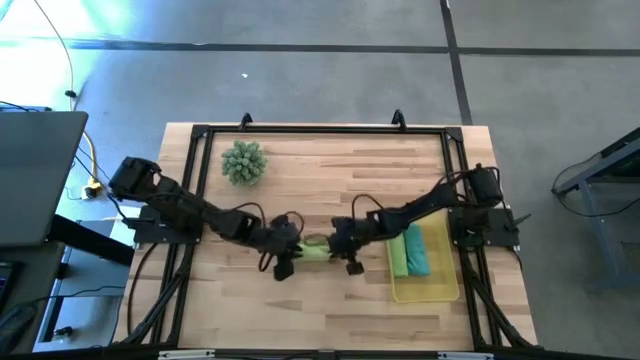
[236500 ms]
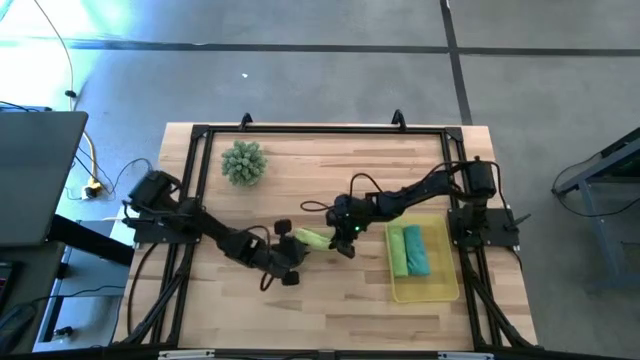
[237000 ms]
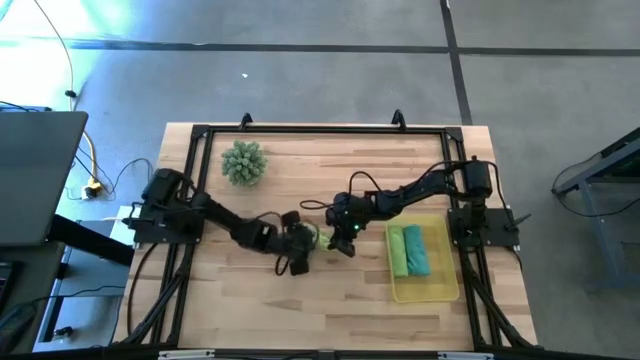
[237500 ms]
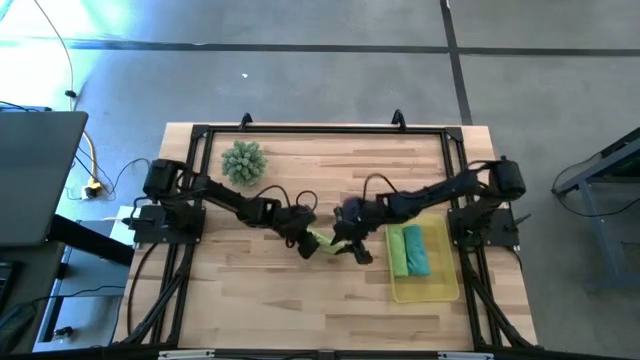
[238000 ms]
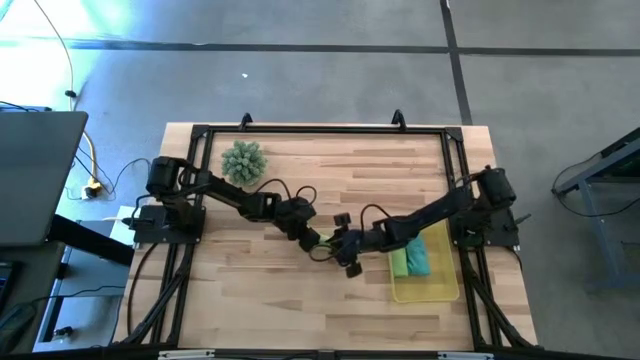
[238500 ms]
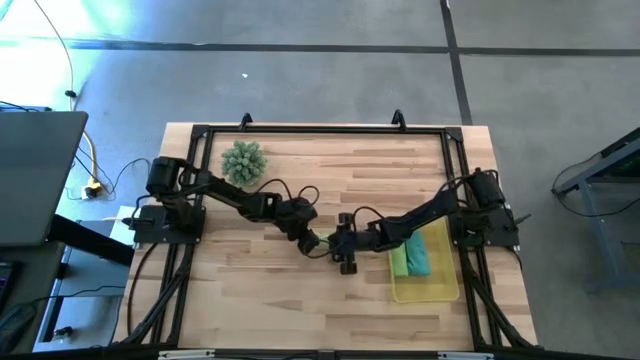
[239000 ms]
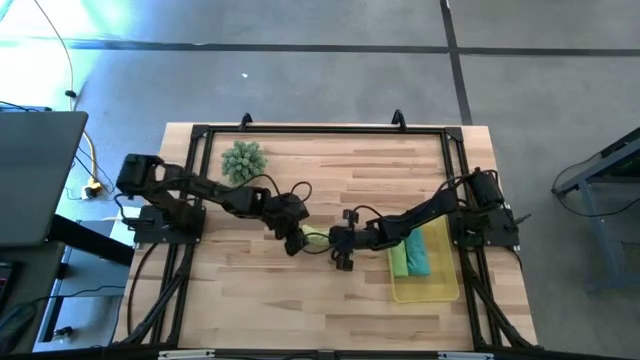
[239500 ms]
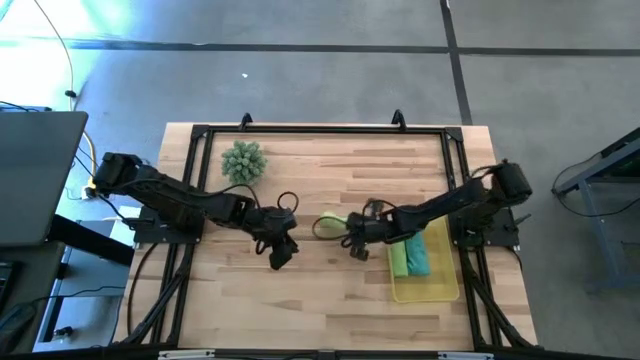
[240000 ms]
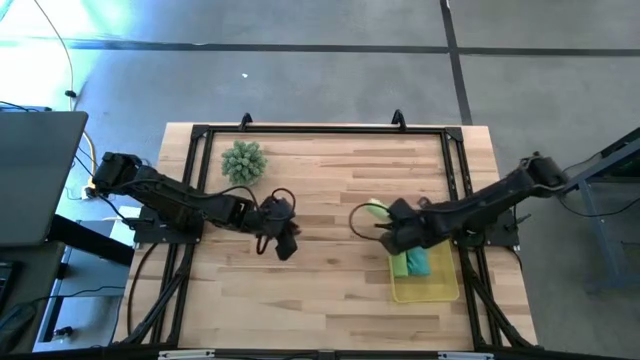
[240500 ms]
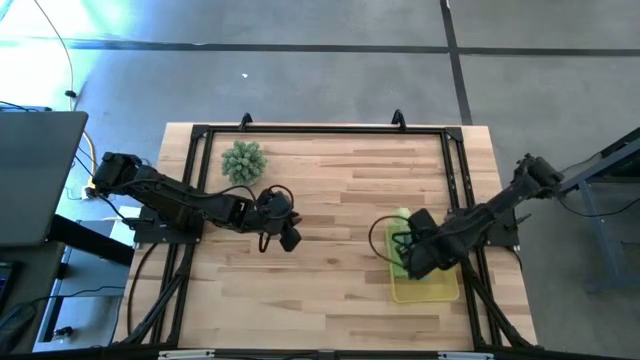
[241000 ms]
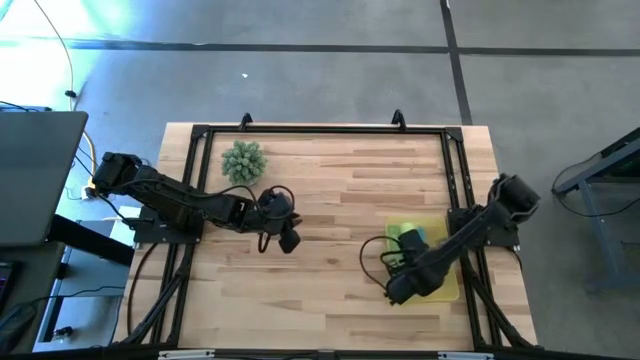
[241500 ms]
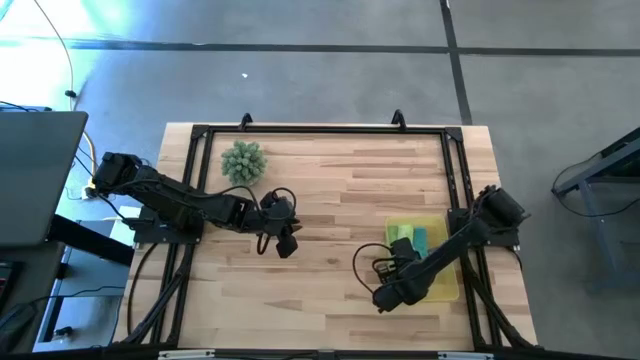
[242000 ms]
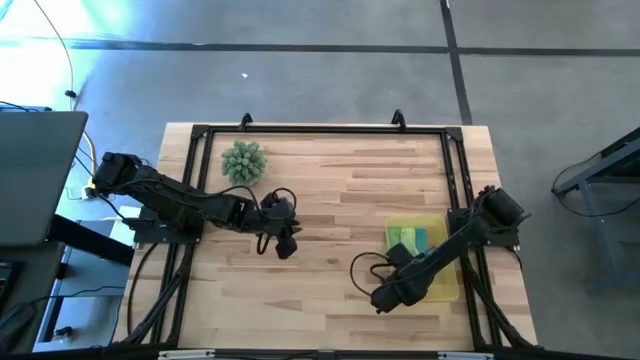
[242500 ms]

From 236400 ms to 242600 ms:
Task: Roll microfiber towels into tight, uniform cylinder then place into a basket
Put the light green cloth into the bin

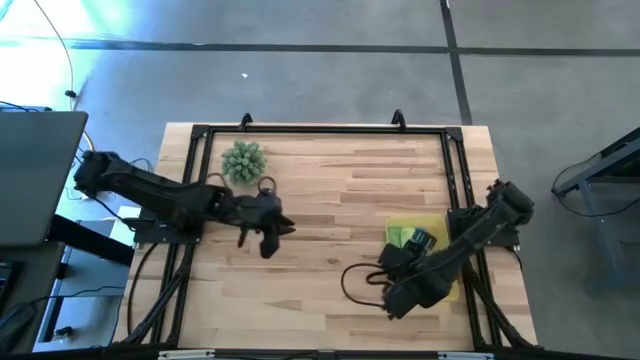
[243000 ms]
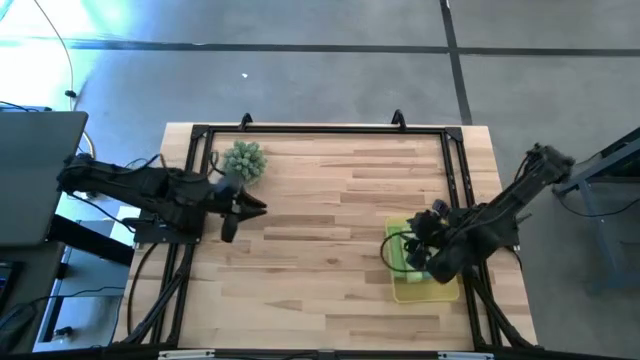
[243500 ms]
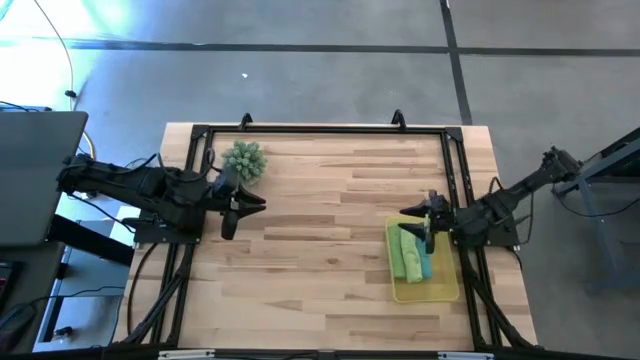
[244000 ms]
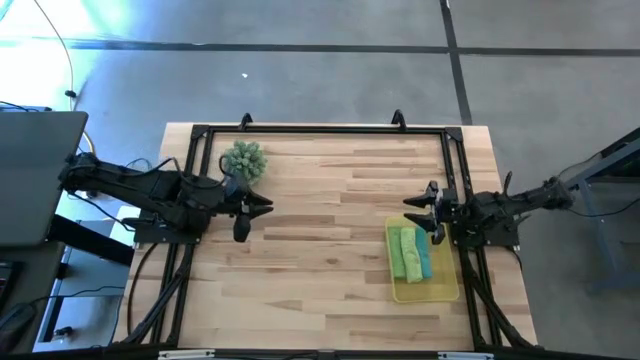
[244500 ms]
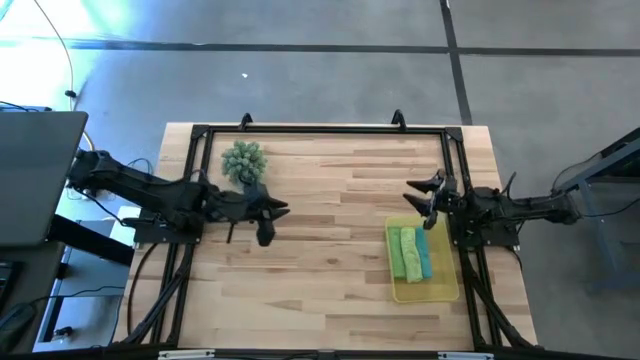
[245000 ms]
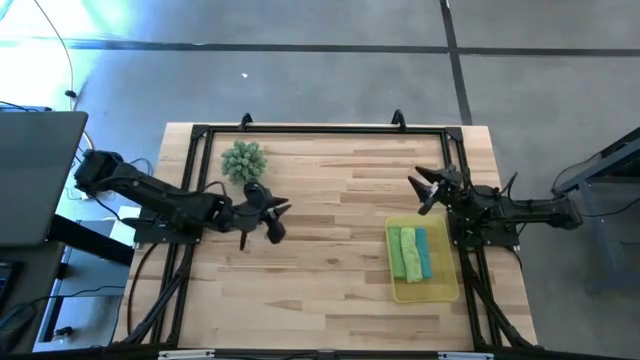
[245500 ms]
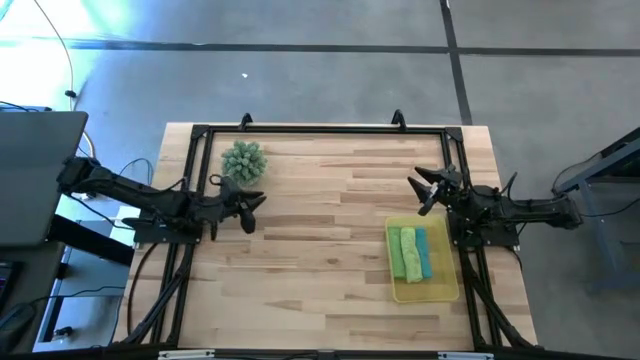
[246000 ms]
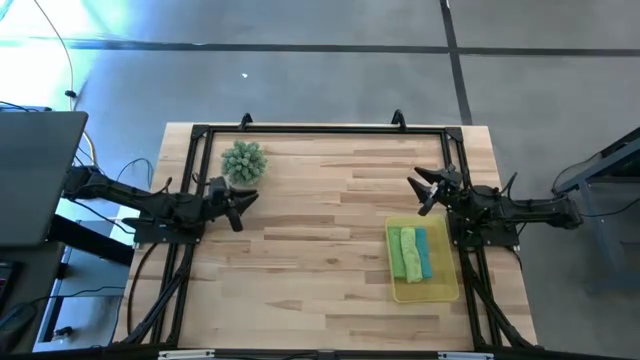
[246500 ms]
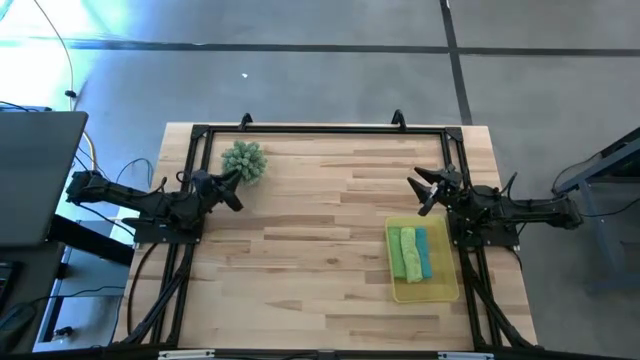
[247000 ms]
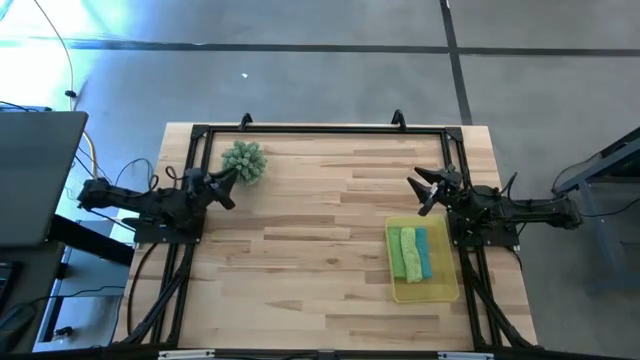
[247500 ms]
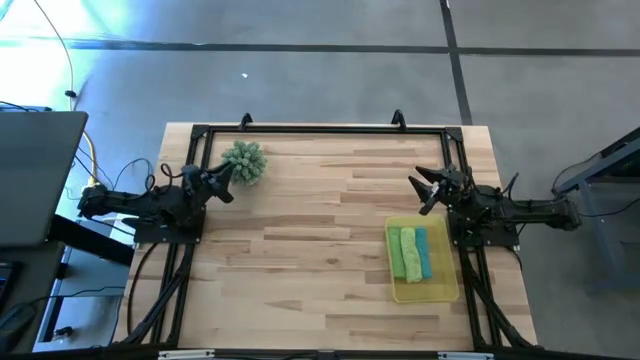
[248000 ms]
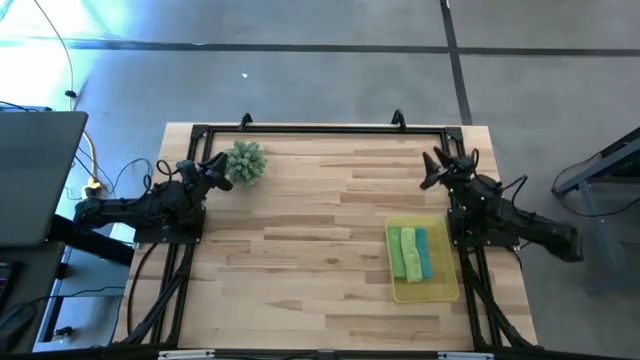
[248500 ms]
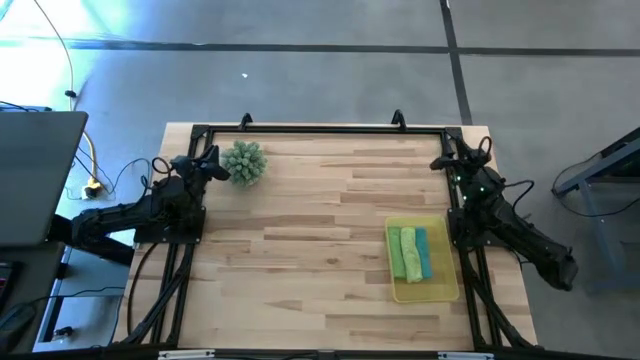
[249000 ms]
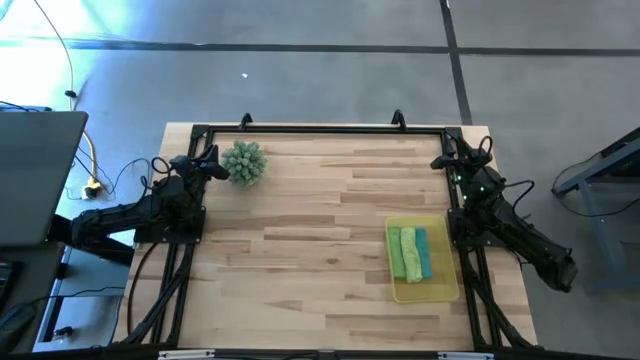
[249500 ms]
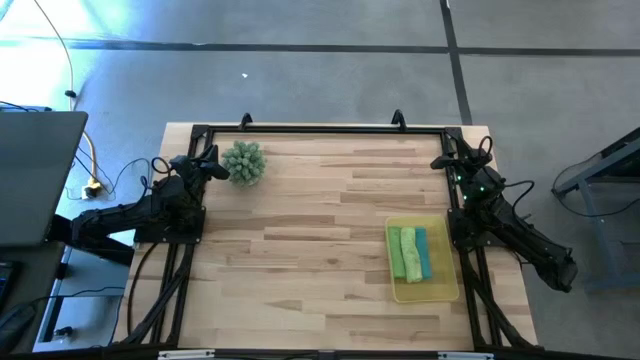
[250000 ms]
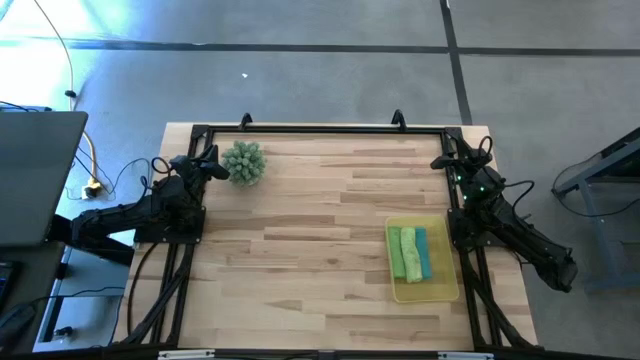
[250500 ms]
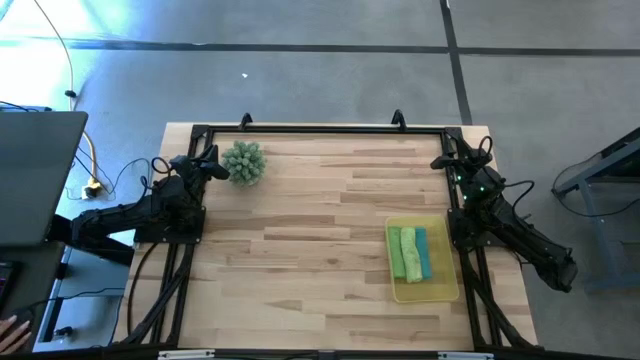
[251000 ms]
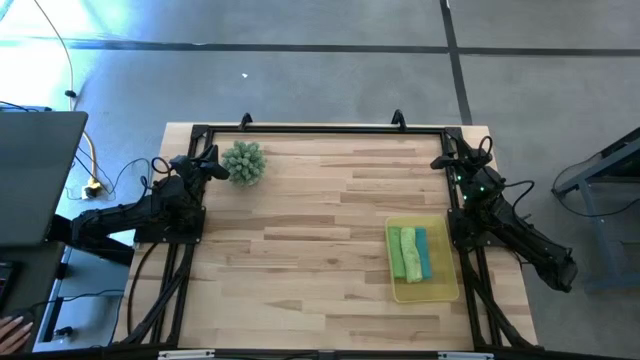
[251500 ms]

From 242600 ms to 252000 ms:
Return to Home Position

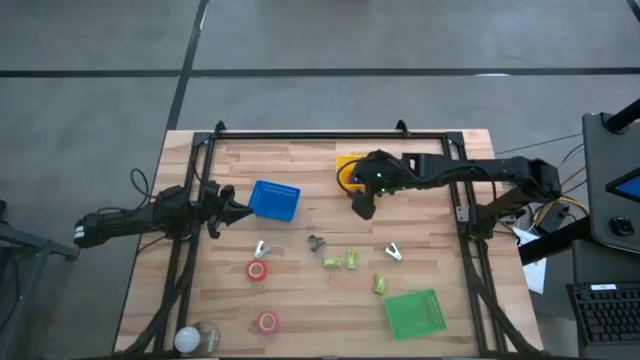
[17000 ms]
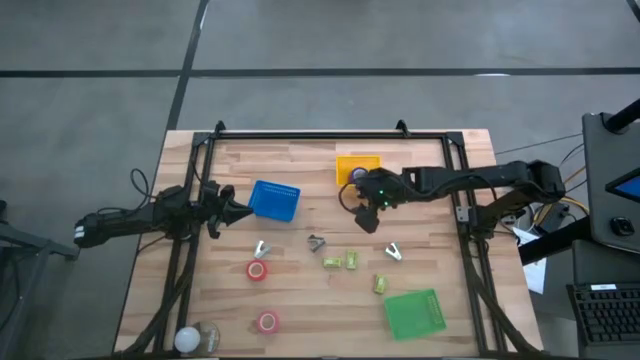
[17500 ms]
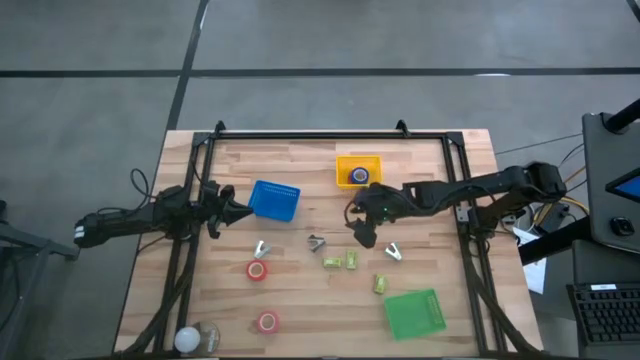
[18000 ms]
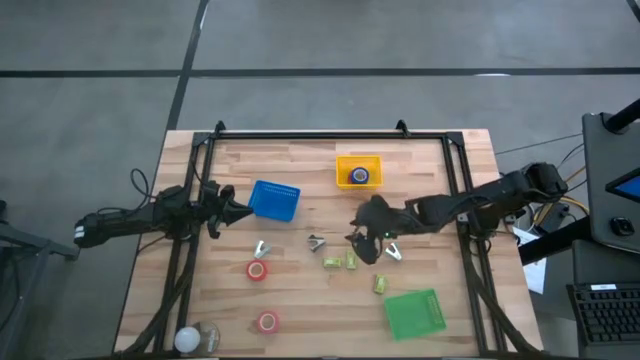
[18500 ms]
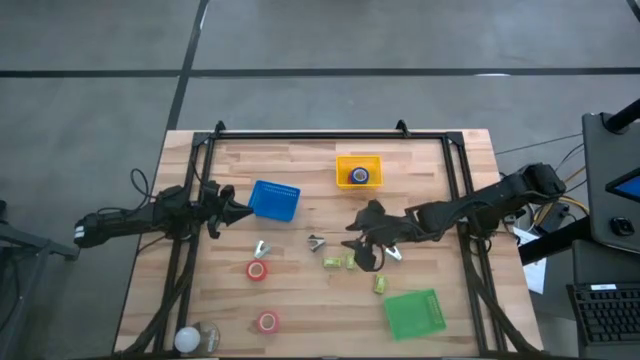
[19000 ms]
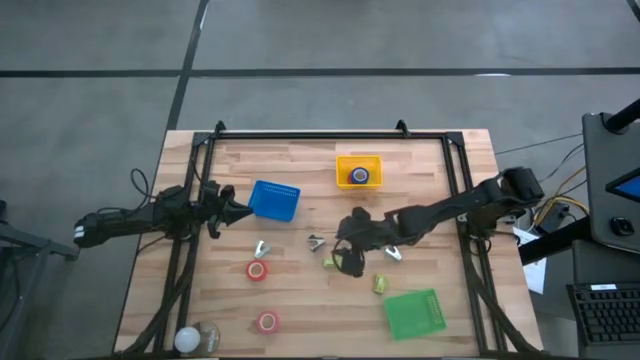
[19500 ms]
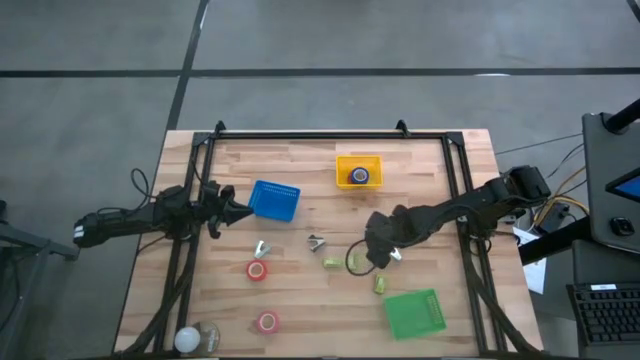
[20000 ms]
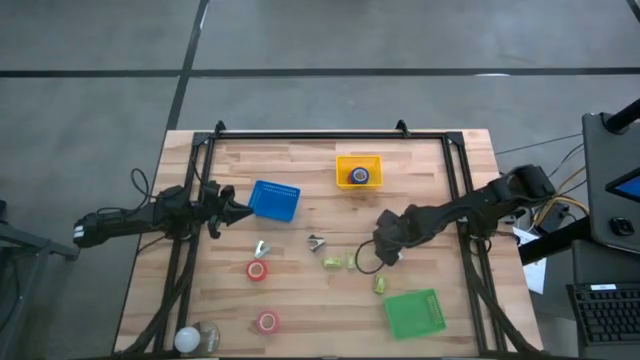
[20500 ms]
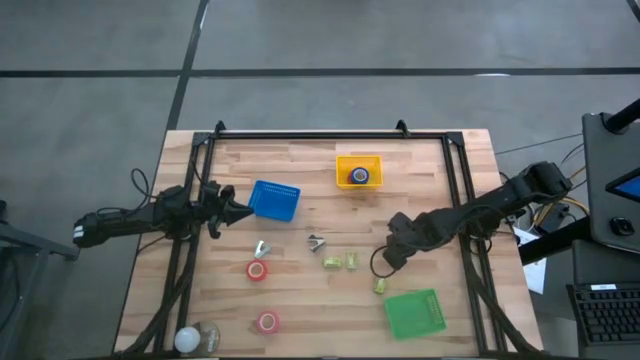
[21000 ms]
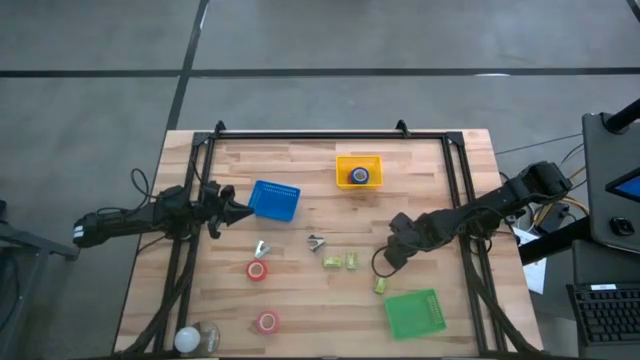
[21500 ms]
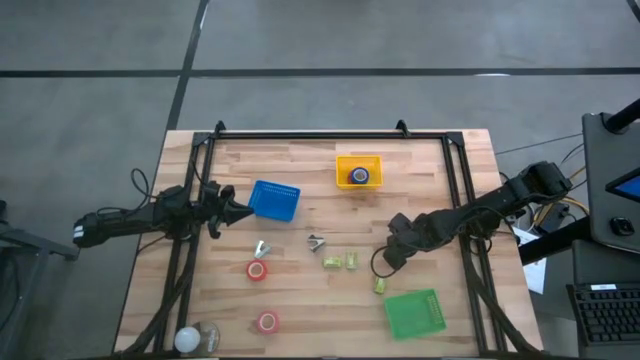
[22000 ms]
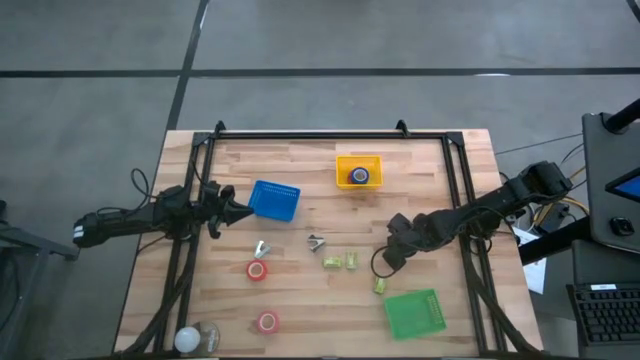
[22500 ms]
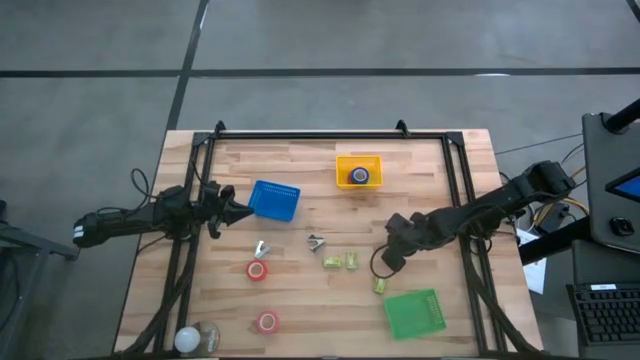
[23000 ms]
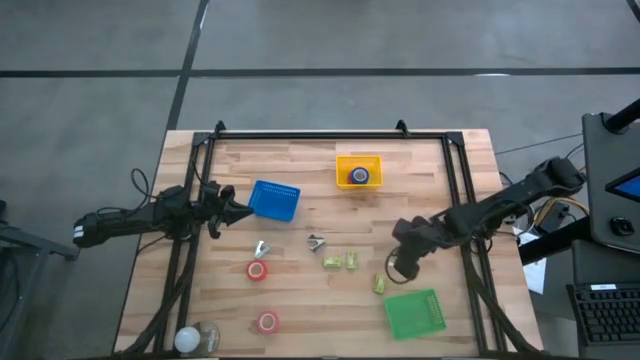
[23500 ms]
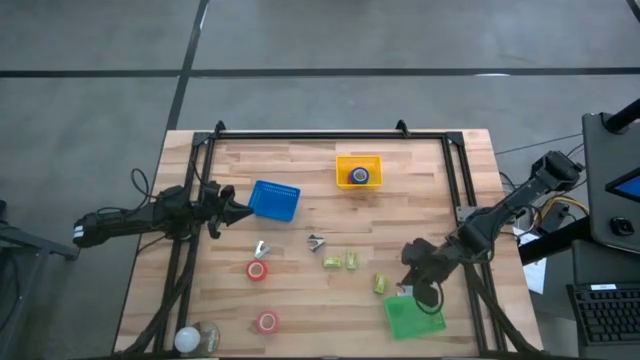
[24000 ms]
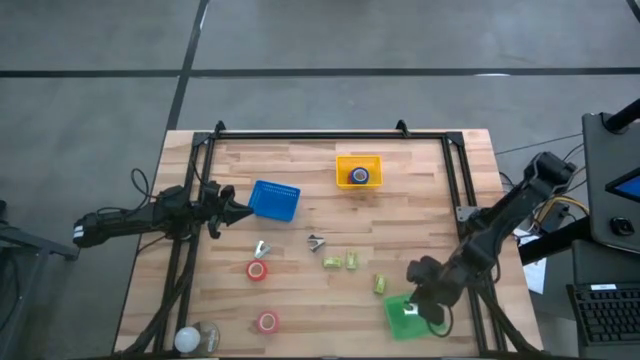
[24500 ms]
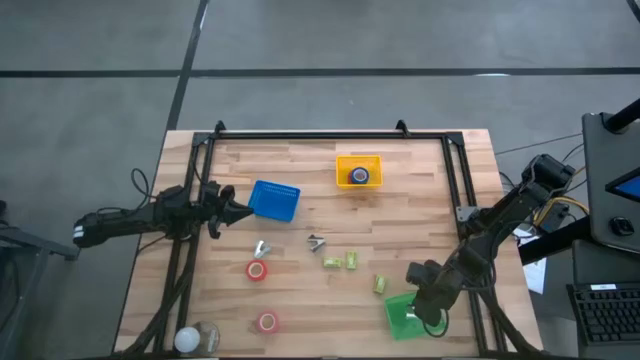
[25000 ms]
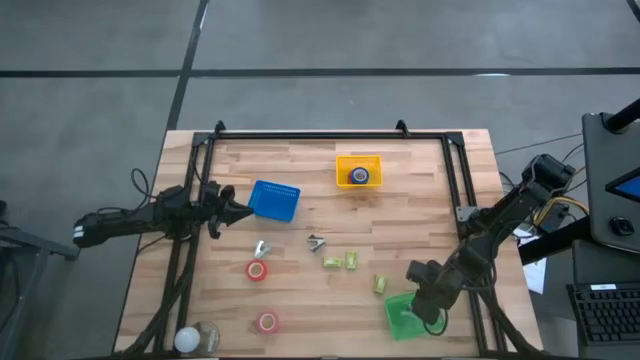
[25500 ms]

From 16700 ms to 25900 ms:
Task: Pick and place Stapler, Stapler remover, tape
Put the right light blue staple remover into the green bin
